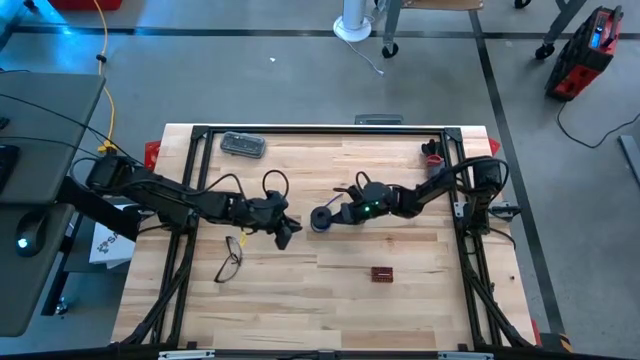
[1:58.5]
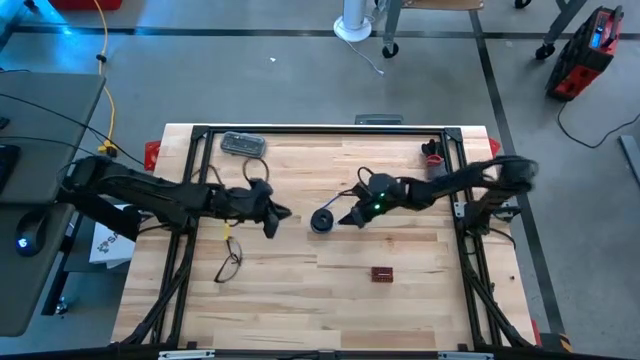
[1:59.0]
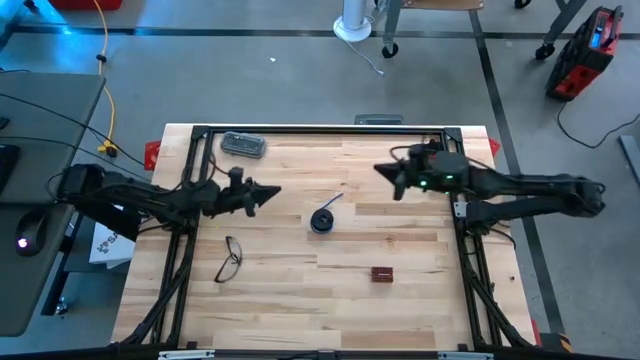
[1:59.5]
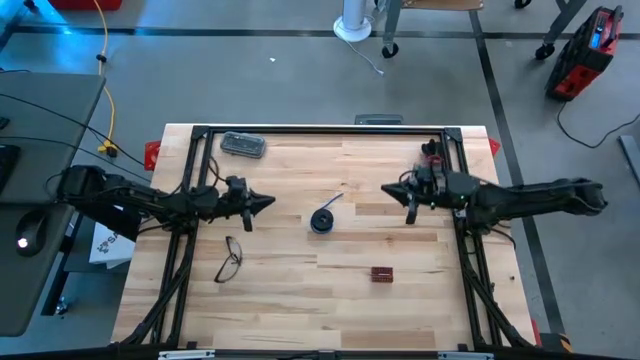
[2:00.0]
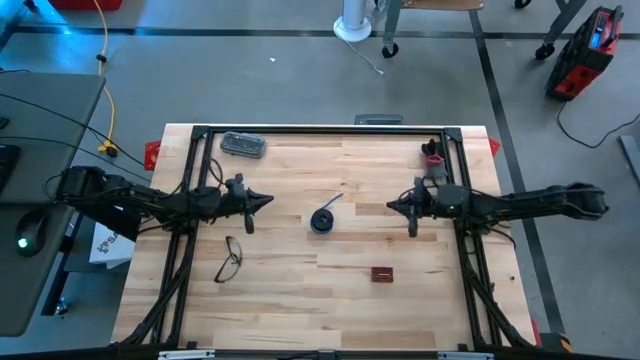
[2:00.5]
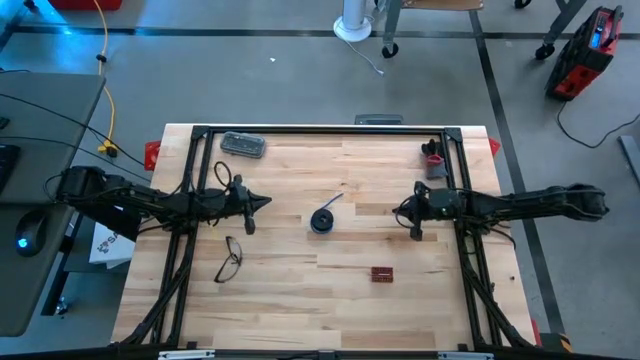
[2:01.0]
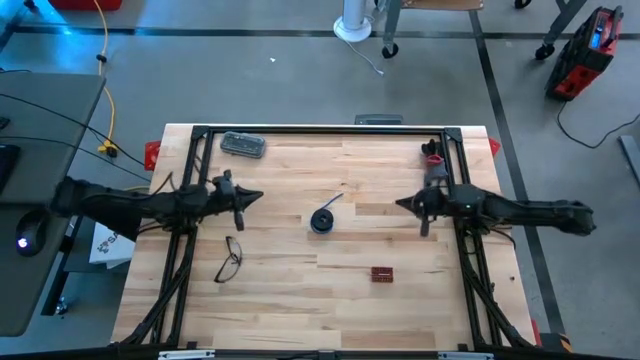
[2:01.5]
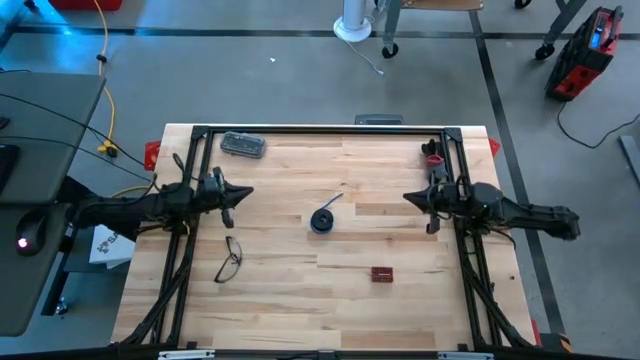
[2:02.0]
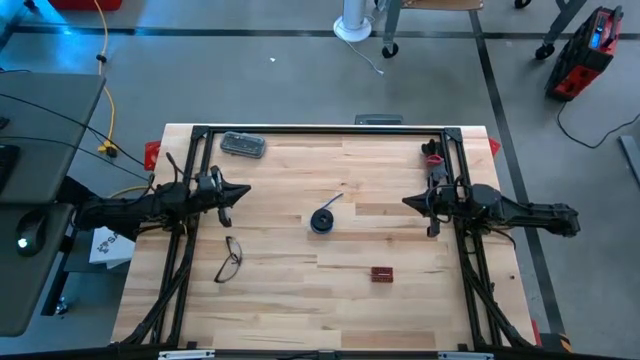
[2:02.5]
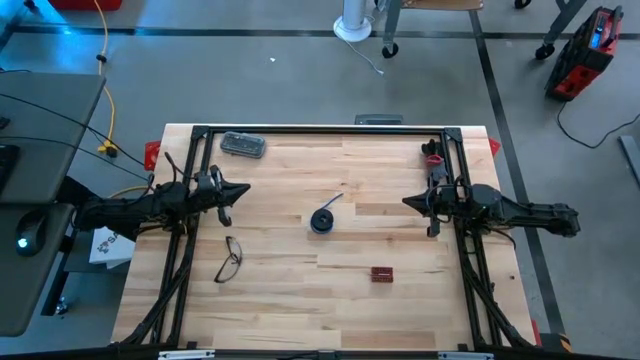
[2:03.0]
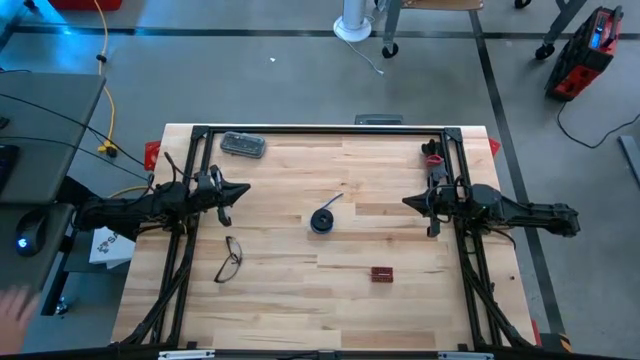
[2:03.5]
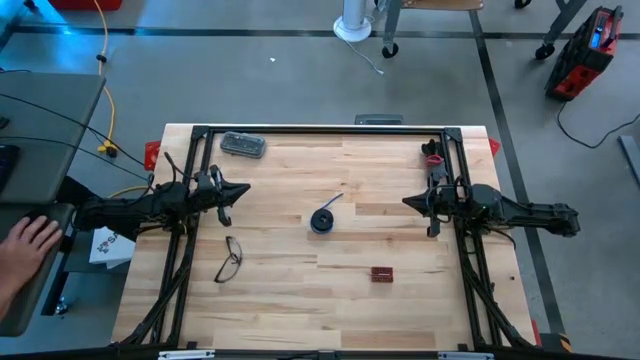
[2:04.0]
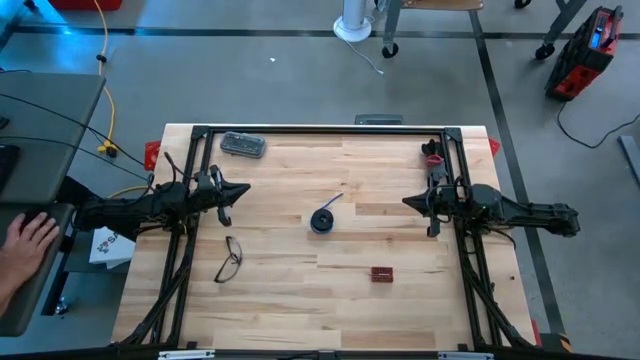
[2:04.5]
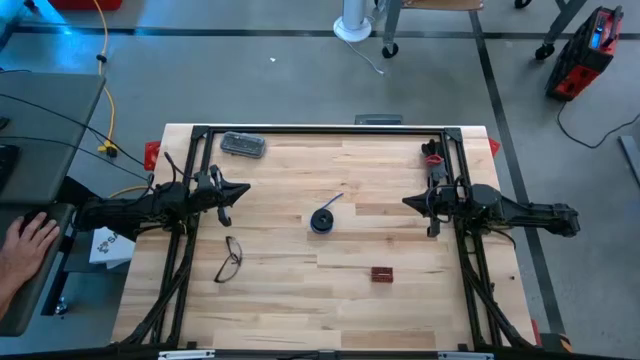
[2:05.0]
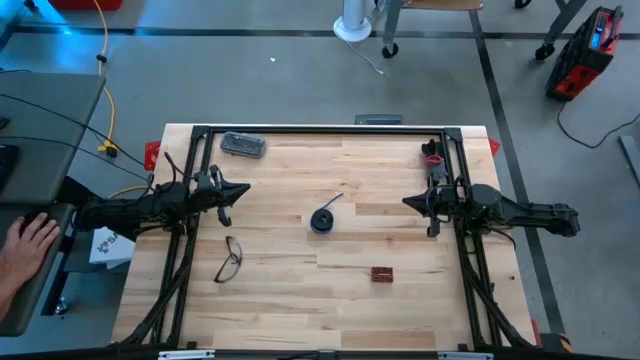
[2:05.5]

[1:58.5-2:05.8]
Task: Coil cords
Return to Home Position

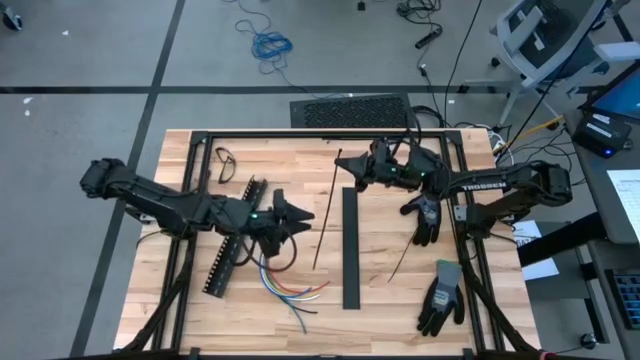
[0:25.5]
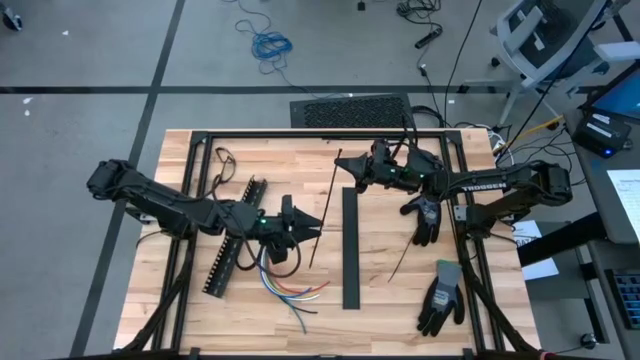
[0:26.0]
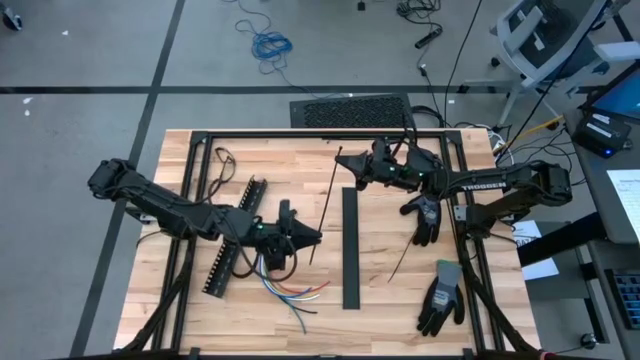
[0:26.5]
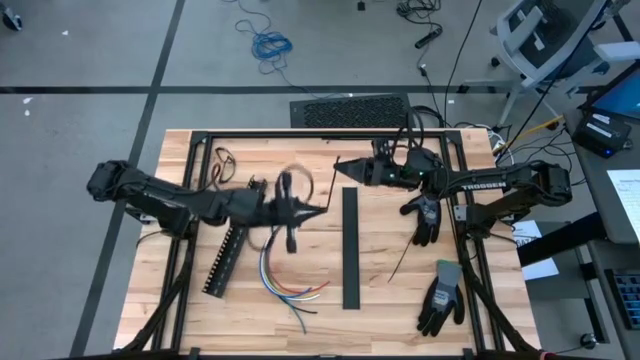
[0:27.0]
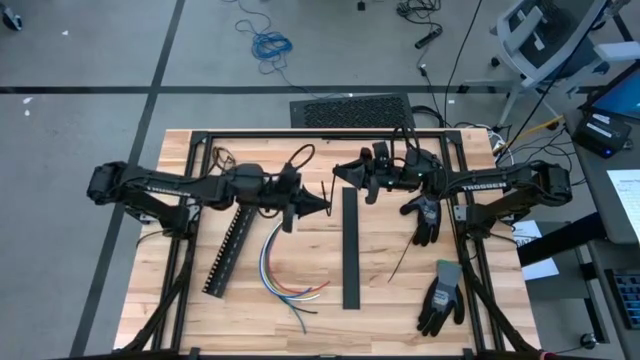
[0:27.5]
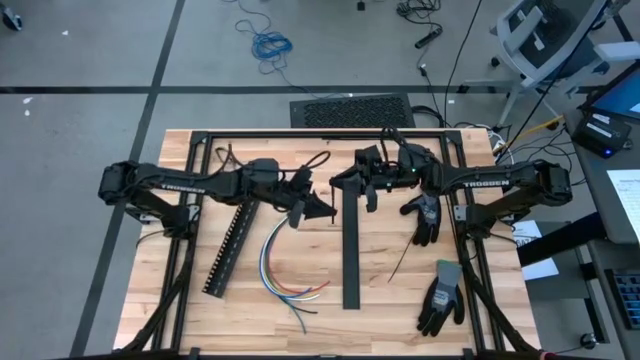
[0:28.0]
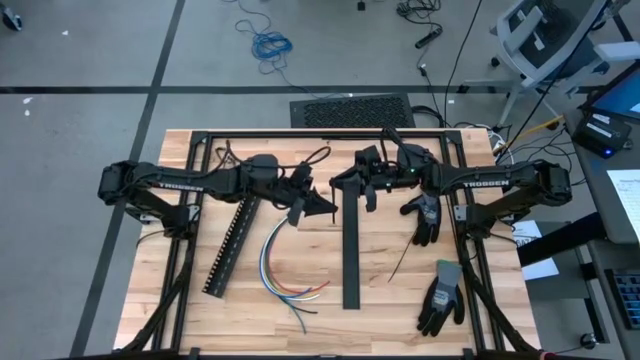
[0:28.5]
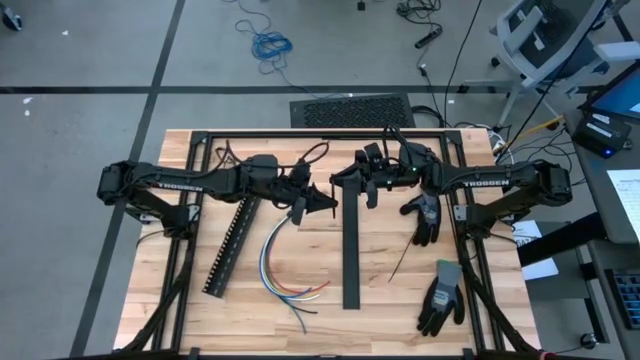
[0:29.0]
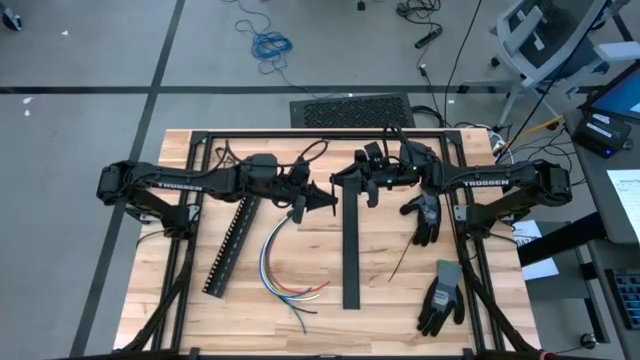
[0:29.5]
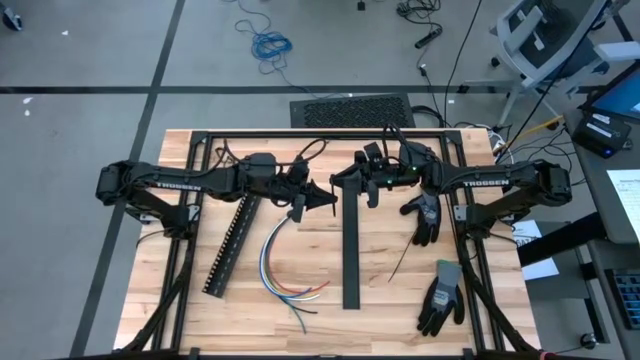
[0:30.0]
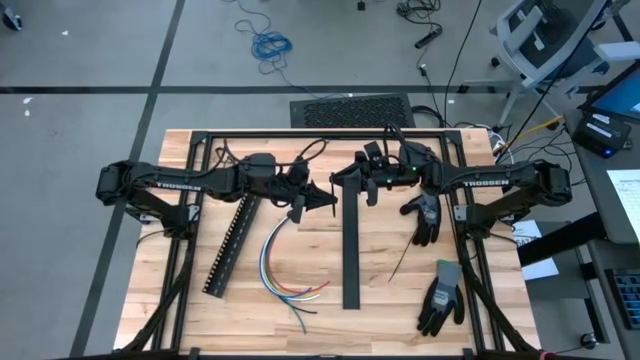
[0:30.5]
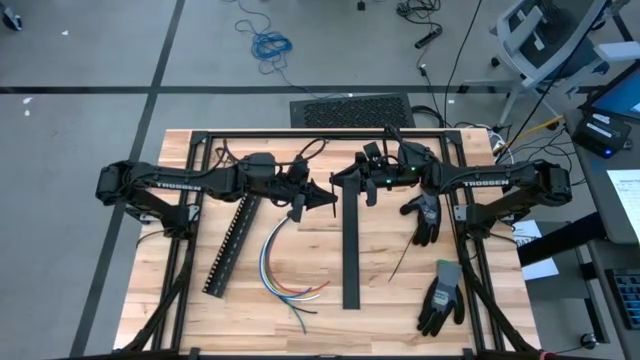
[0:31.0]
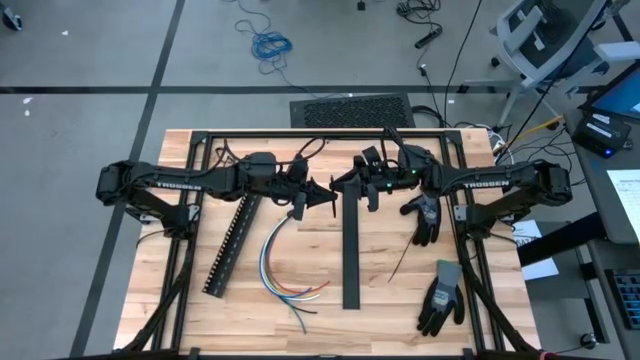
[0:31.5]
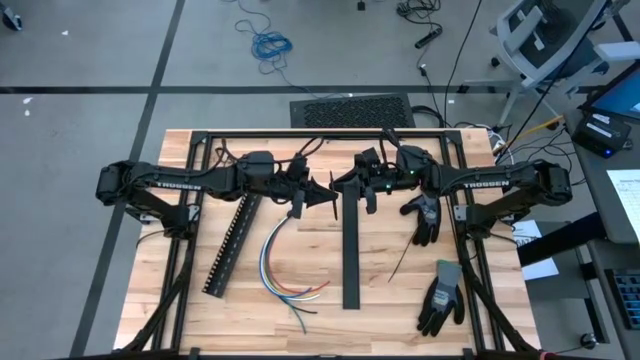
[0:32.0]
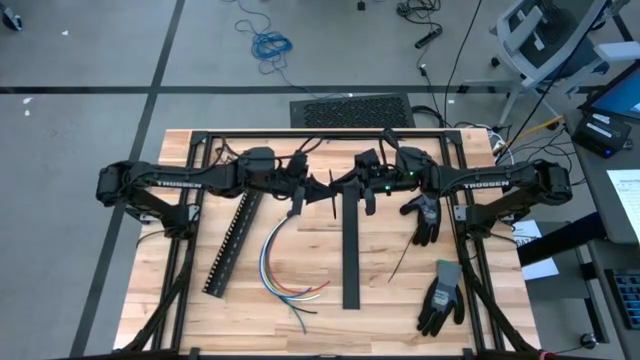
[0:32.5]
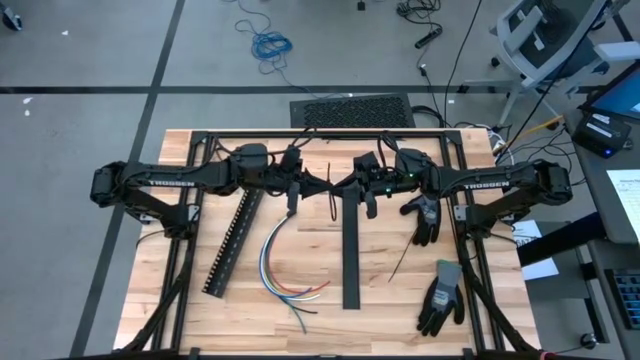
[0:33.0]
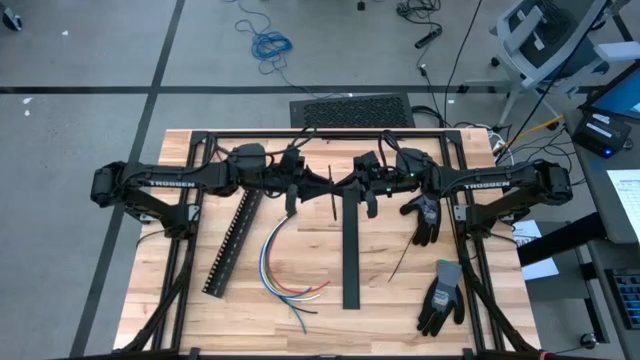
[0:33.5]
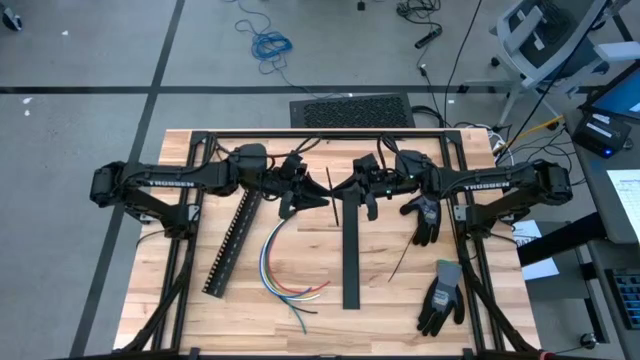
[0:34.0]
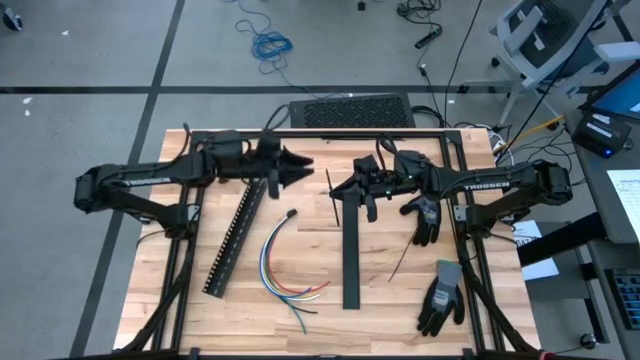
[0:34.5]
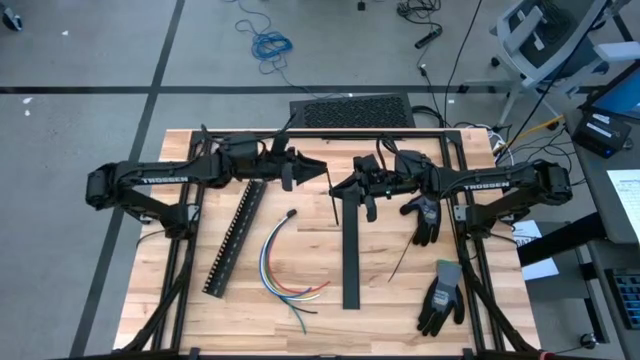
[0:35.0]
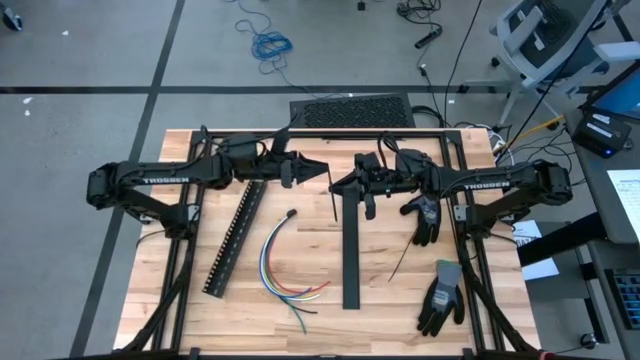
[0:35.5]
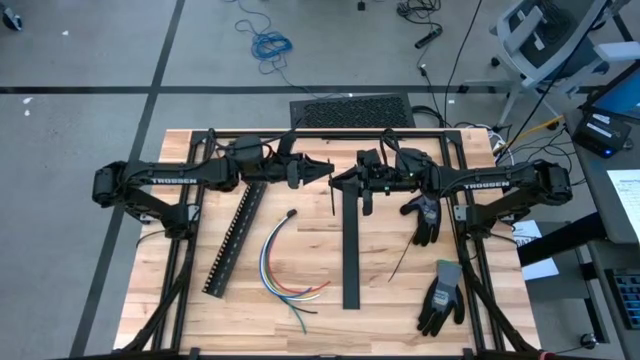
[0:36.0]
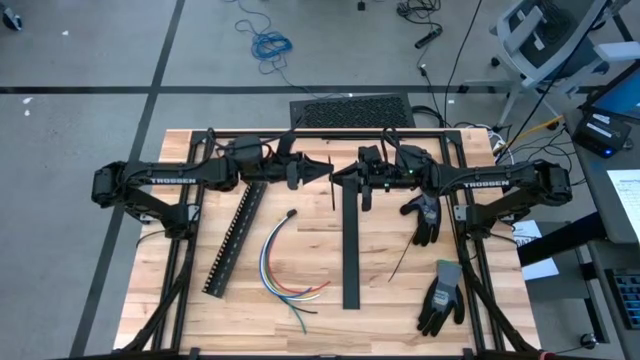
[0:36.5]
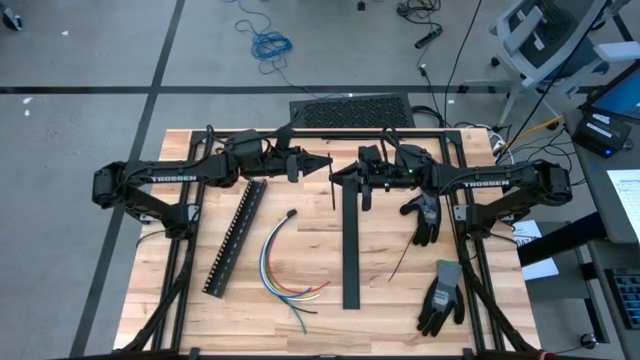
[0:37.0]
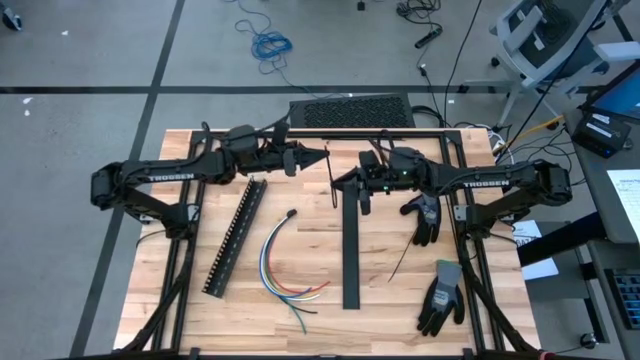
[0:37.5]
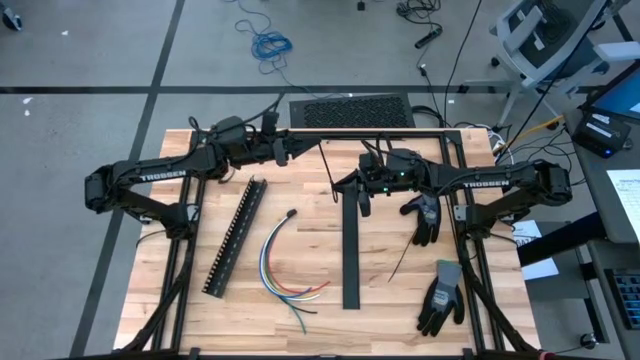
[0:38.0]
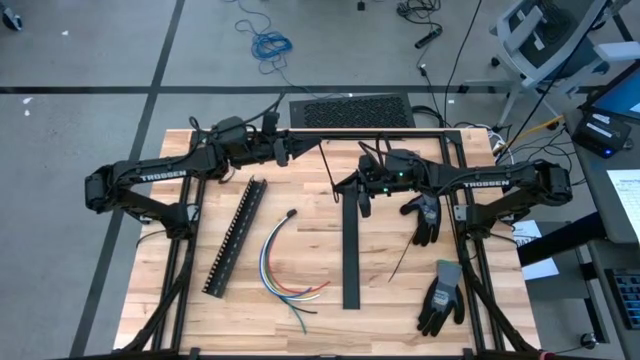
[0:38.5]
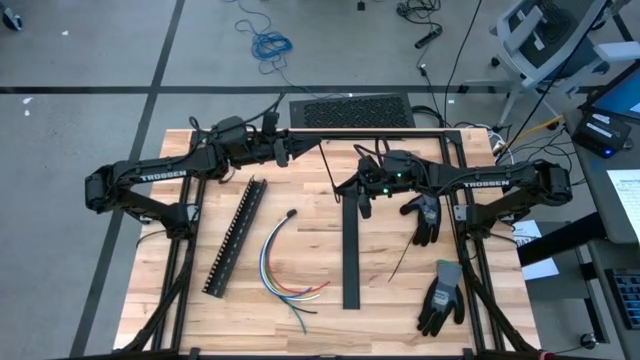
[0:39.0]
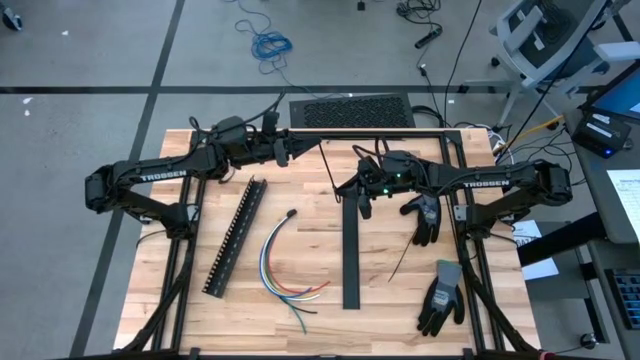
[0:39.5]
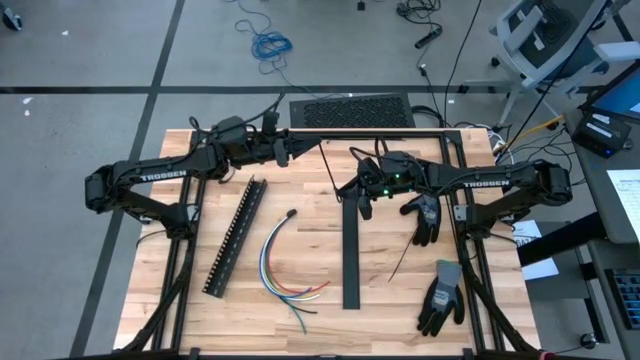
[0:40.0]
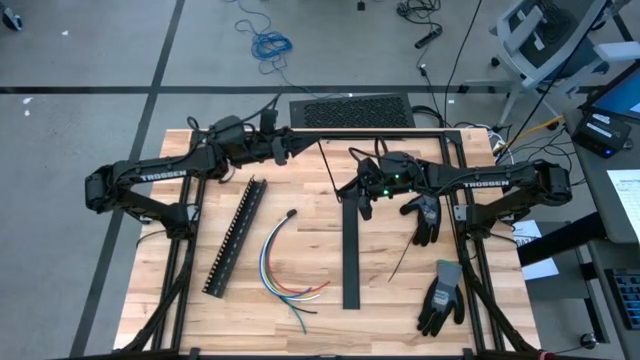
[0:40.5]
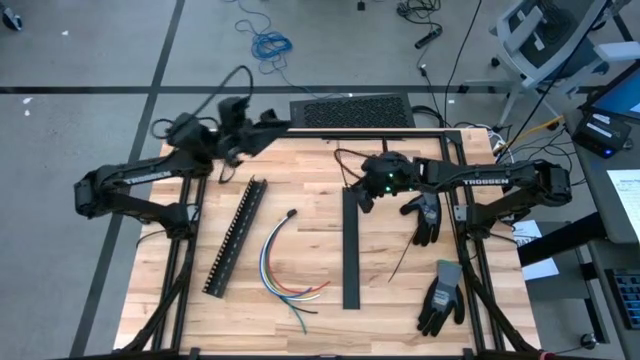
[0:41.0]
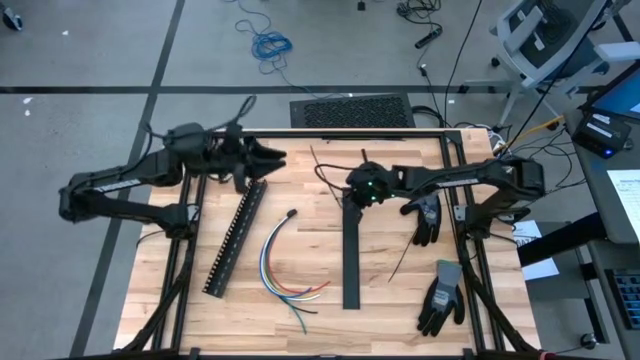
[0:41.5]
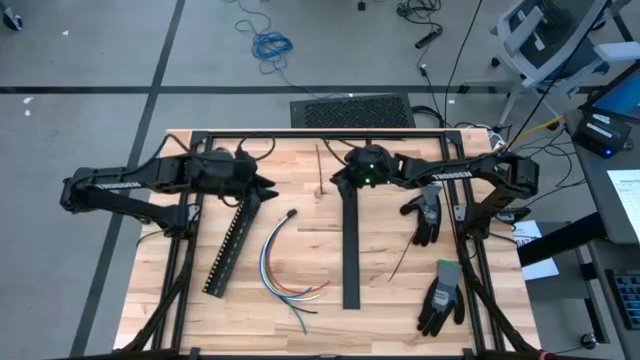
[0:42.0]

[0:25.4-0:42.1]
Task: Ziptie cables
Prepare the zip tie
